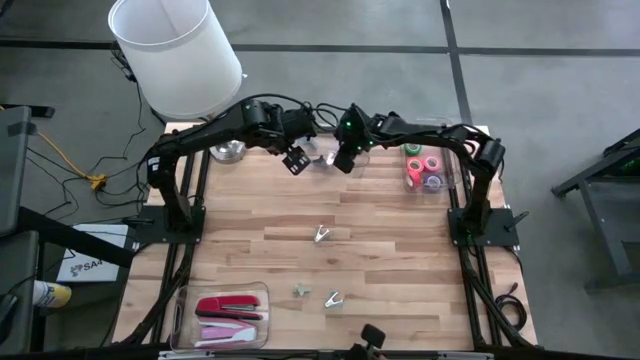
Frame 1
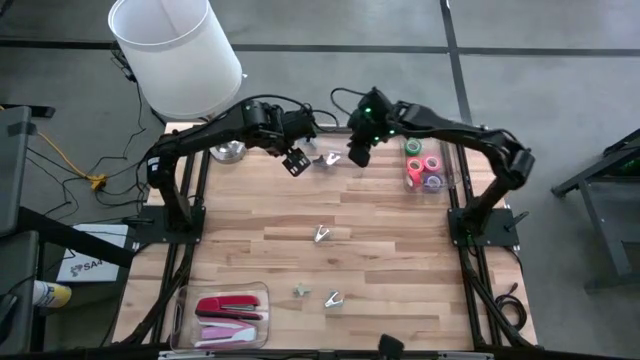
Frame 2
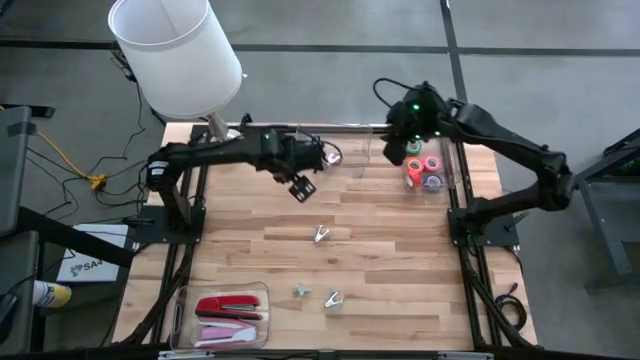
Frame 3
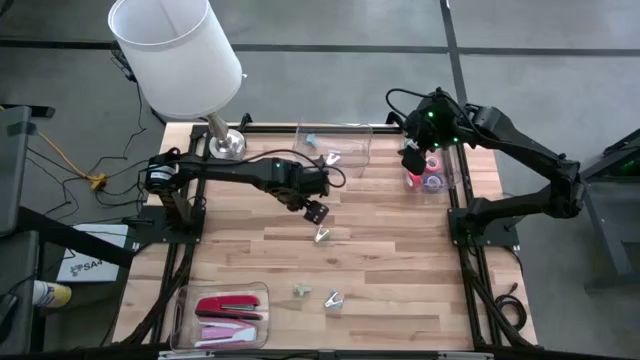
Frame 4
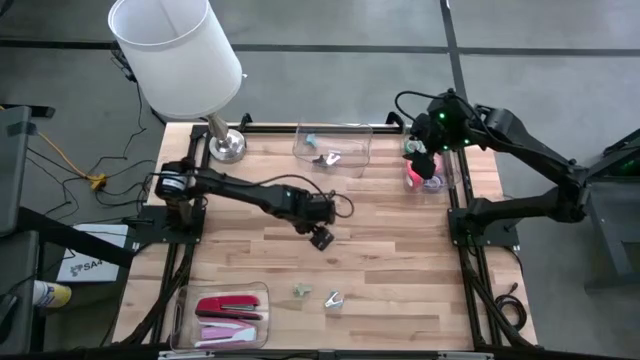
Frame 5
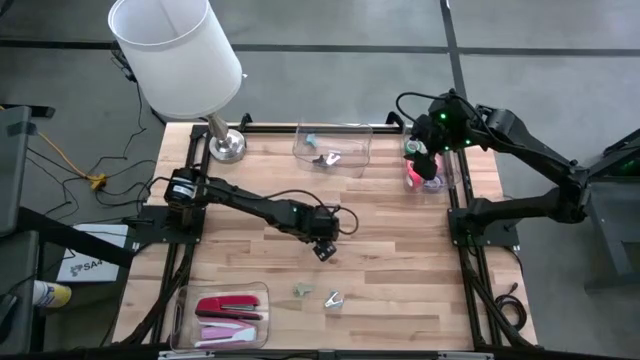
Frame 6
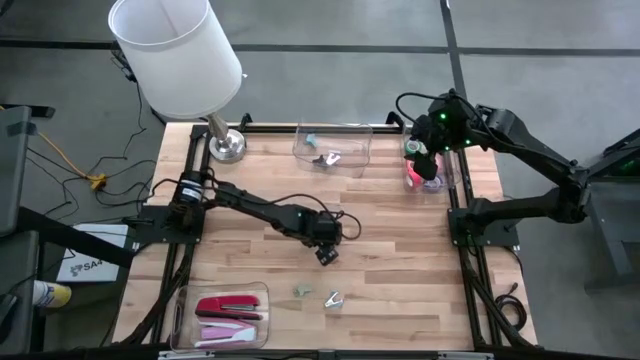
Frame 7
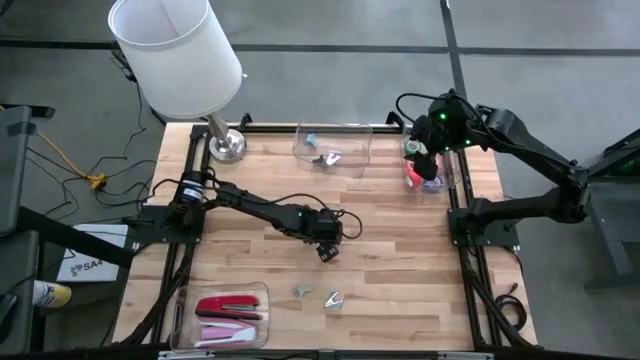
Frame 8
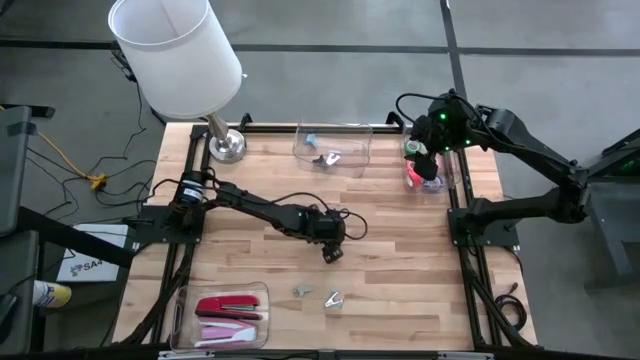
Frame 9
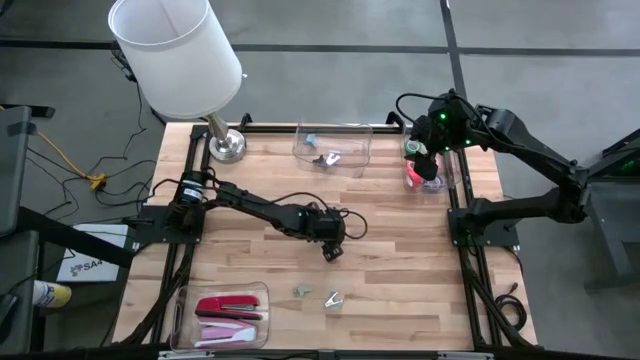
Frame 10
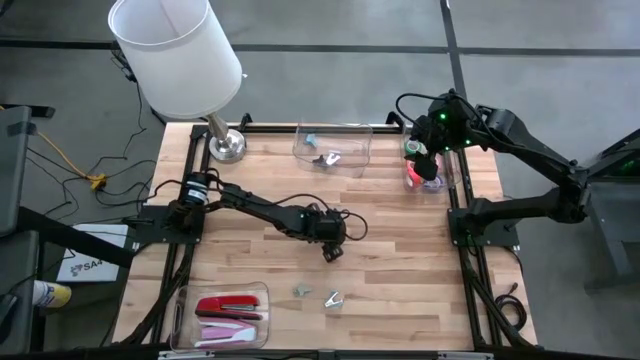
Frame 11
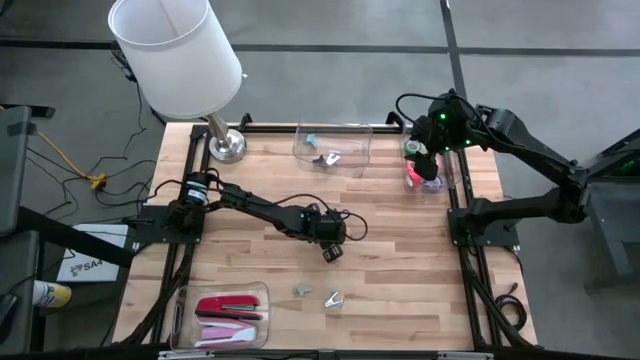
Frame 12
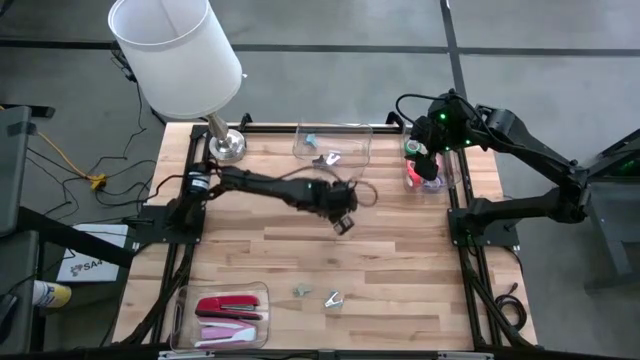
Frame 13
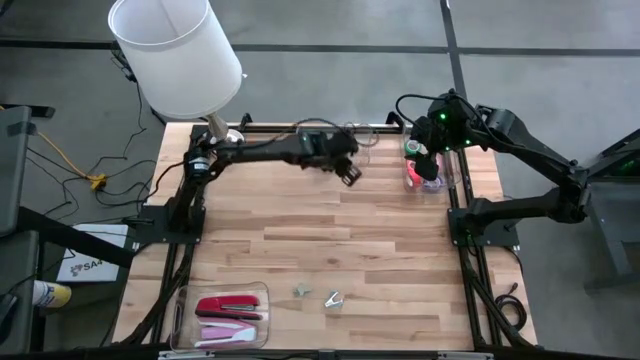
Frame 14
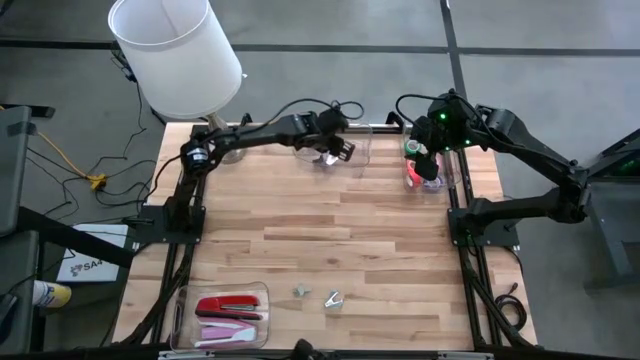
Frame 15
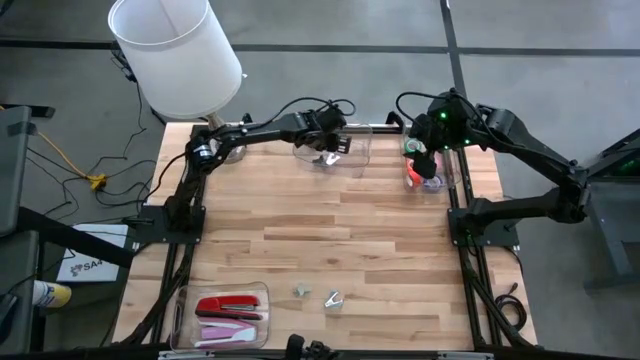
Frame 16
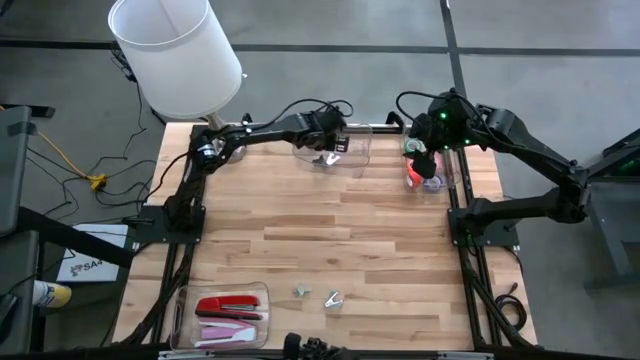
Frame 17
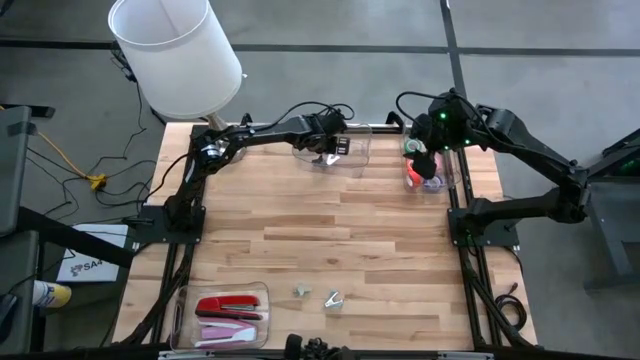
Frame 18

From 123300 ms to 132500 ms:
Task: Pick and place Stapler, Stapler remover, tape
Put the top gray staple remover into the top left transparent bin

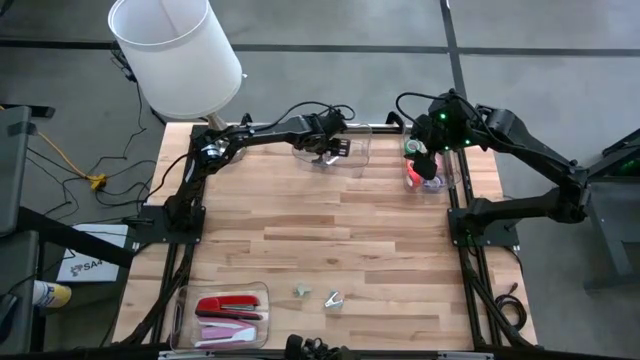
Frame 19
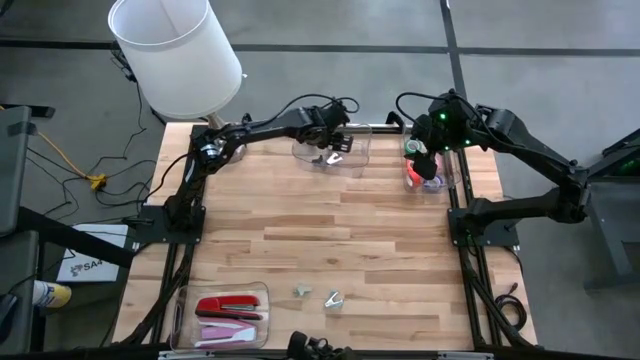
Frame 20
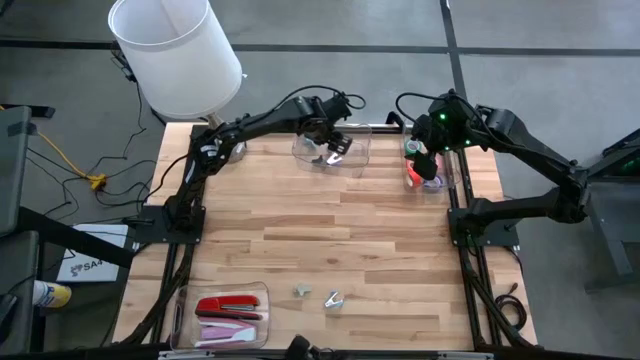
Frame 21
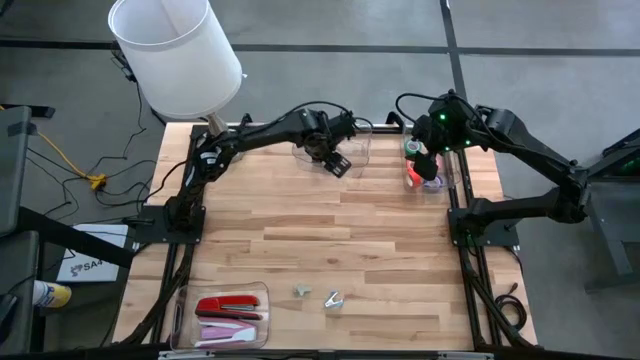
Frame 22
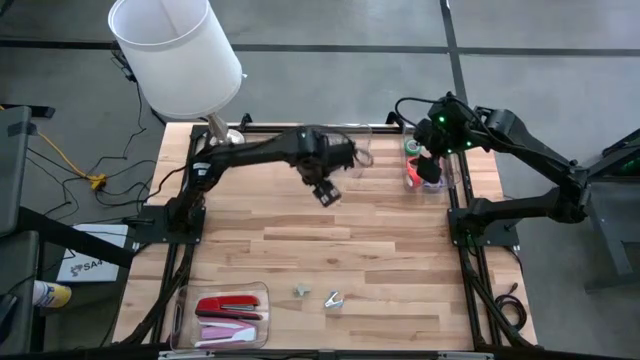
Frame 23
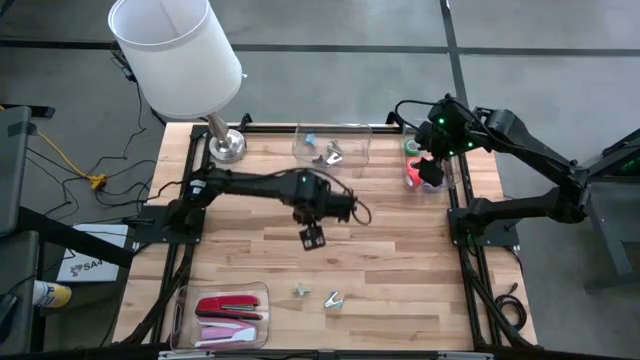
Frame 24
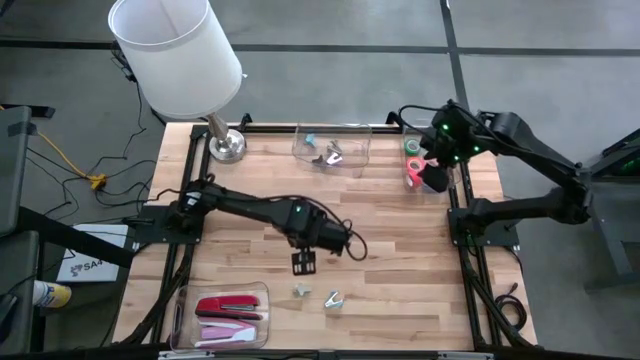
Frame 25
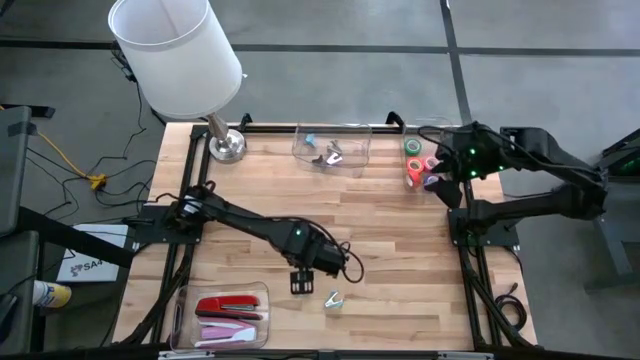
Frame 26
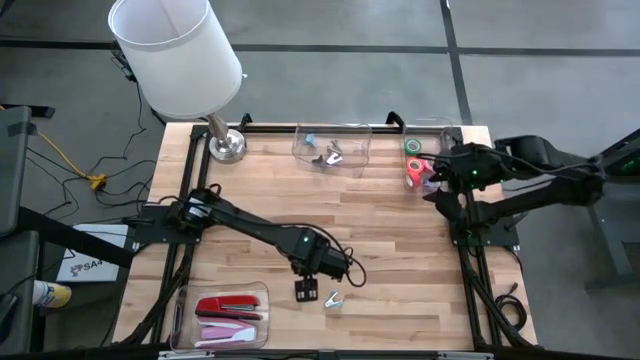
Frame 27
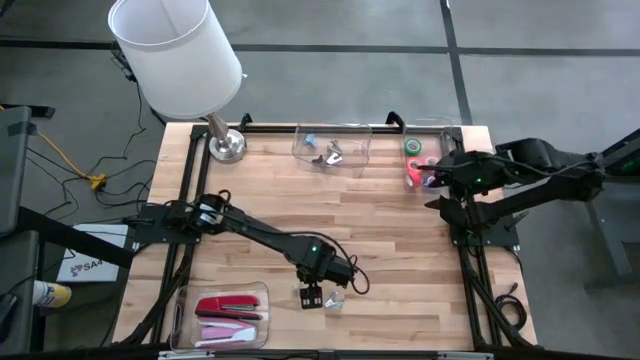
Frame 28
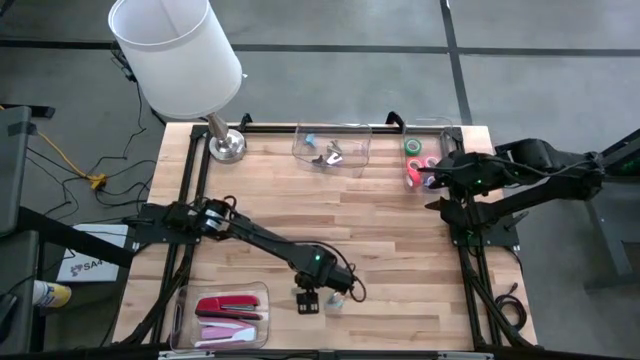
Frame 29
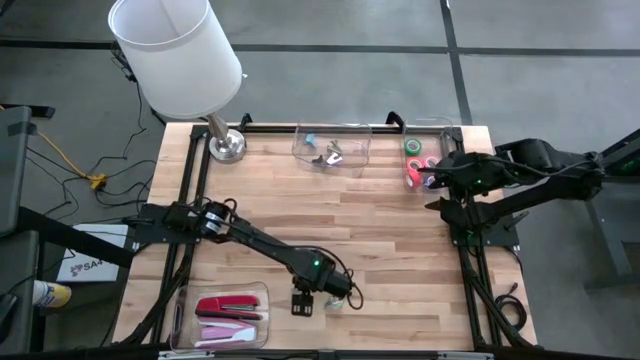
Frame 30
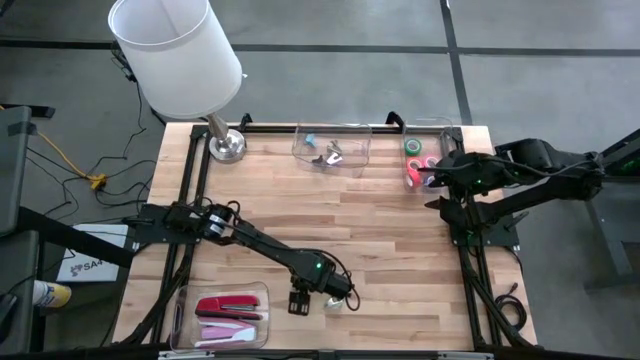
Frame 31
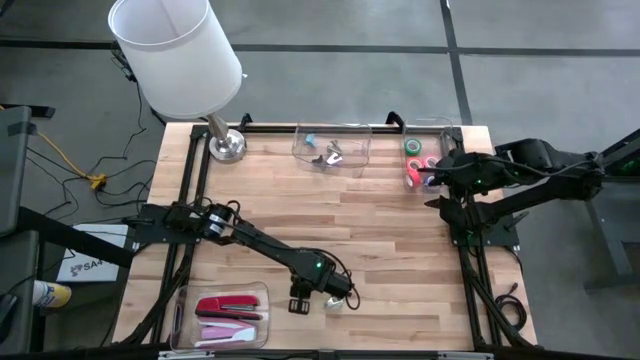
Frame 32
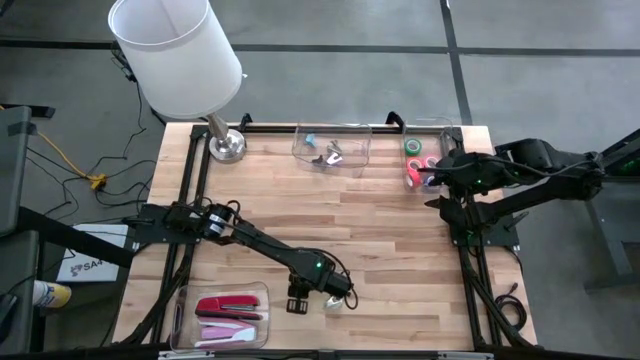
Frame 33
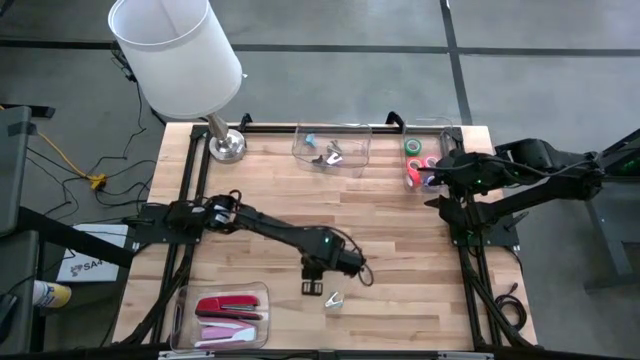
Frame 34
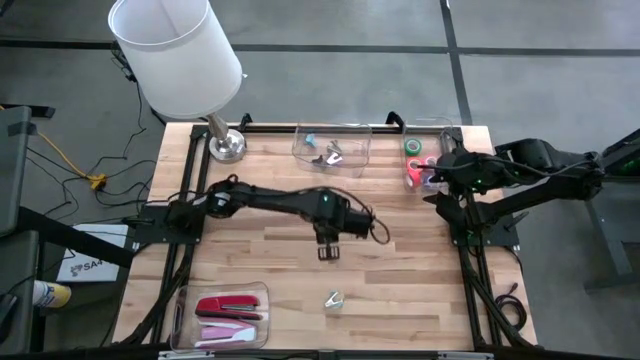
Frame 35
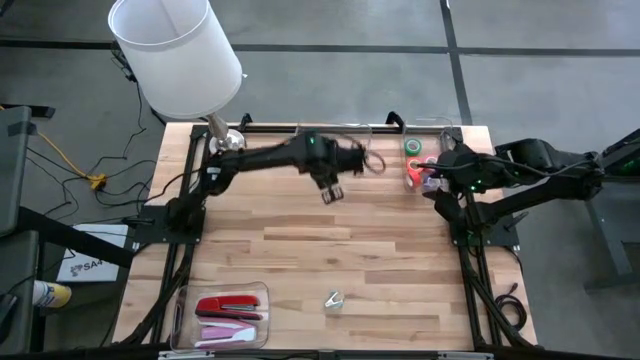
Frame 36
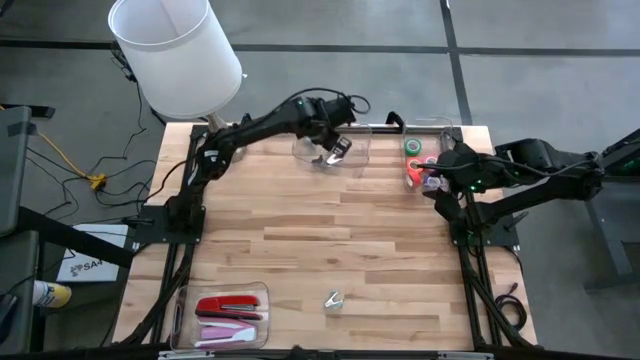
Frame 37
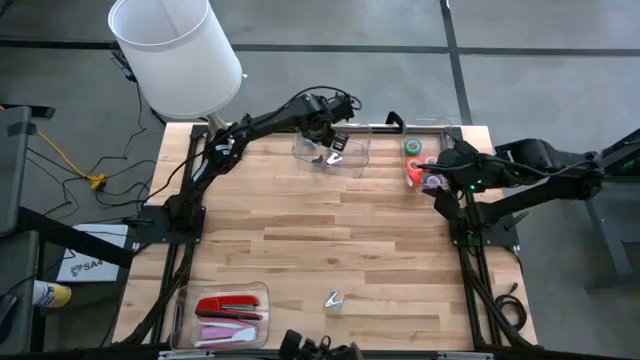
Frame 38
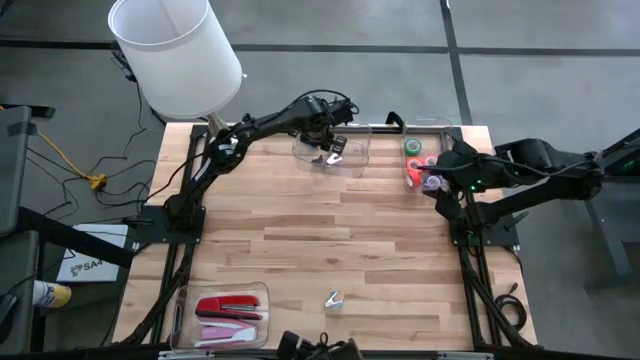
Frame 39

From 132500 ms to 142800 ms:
Put the gray staple remover into the top left transparent bin

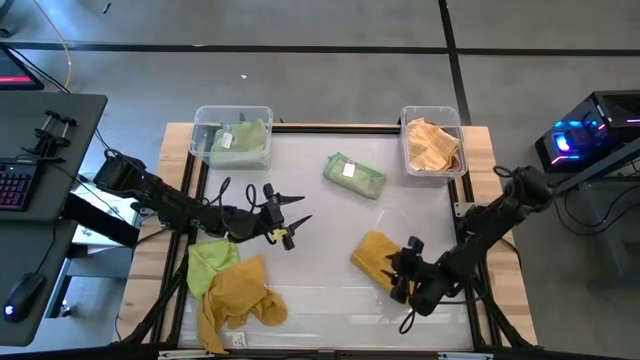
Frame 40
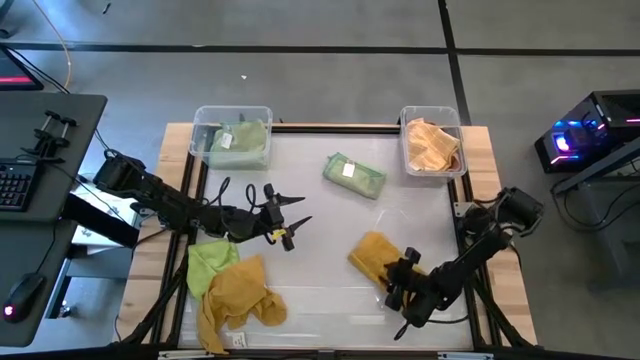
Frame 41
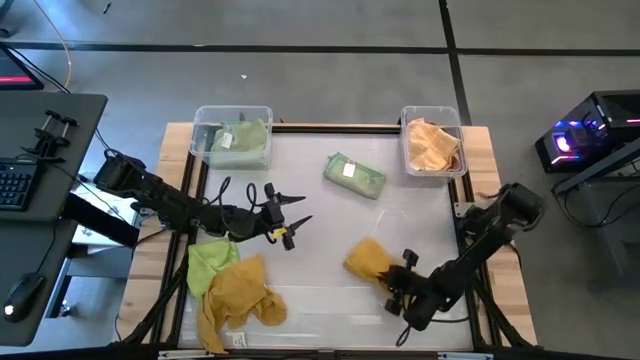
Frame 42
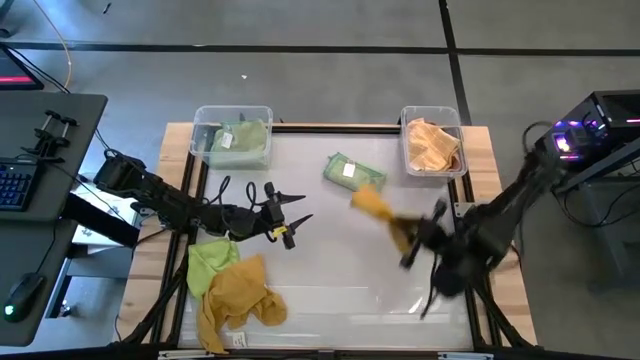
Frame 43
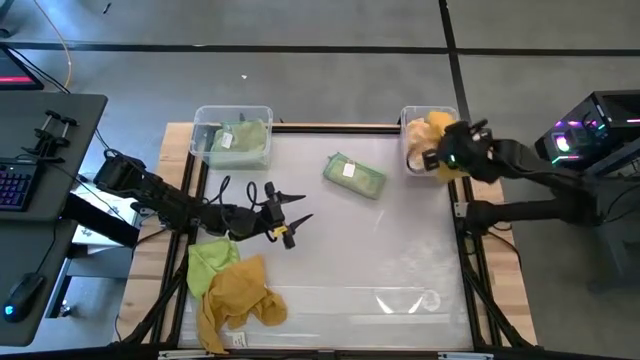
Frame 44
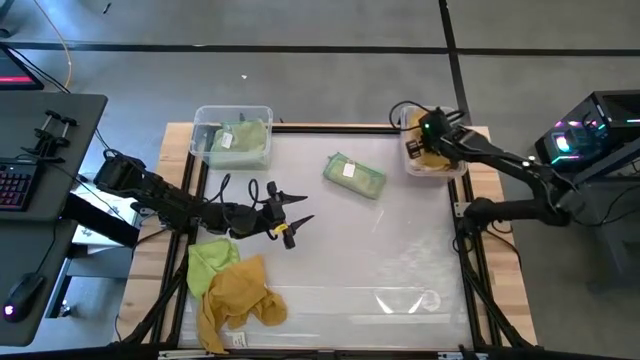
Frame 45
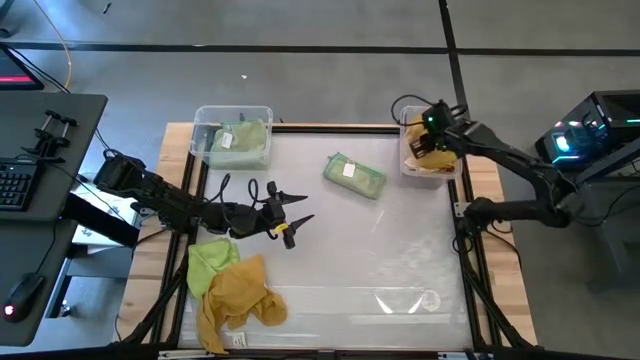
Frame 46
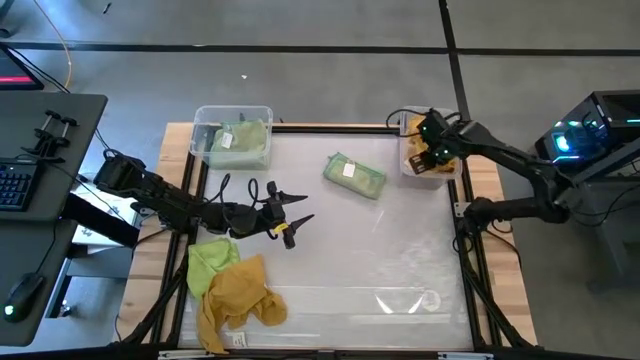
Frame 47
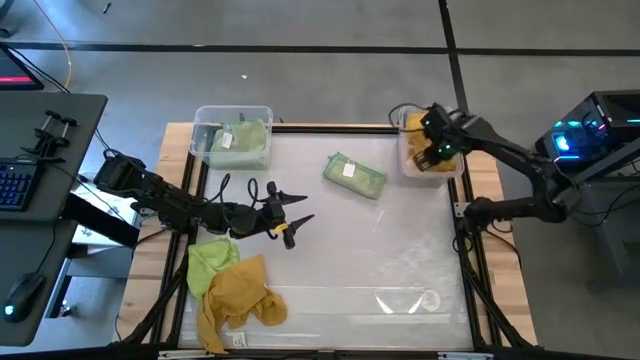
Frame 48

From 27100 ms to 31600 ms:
Task: Sort towels by color in basket
Put the right yellow kitchen towel into the right transparent bin
